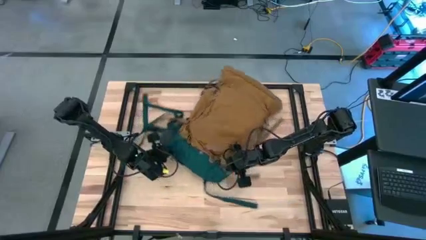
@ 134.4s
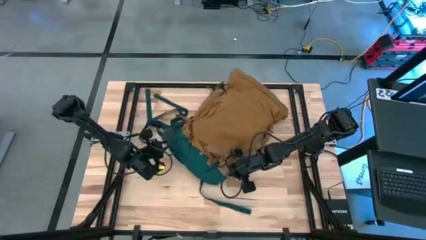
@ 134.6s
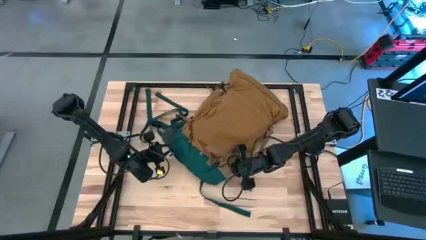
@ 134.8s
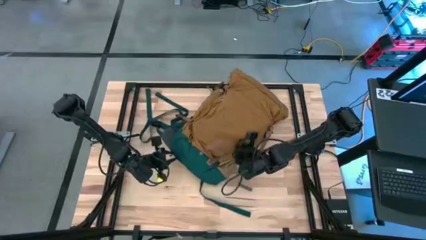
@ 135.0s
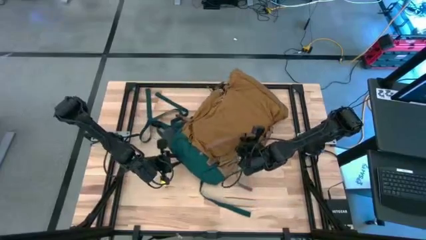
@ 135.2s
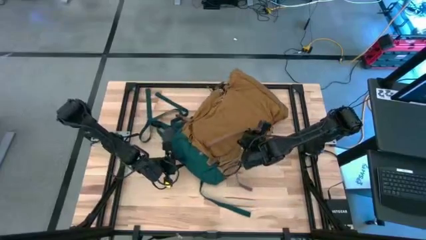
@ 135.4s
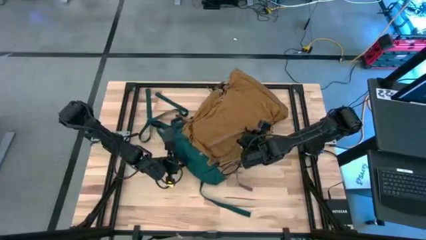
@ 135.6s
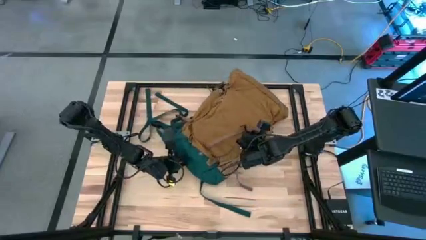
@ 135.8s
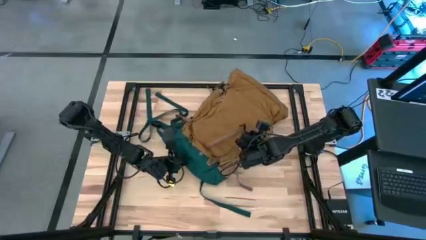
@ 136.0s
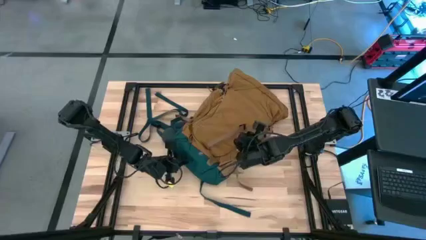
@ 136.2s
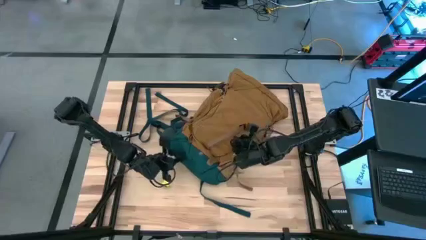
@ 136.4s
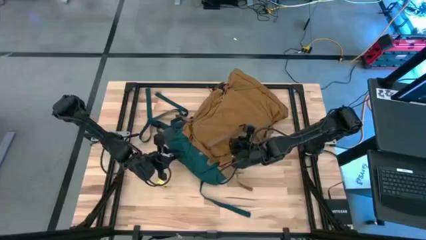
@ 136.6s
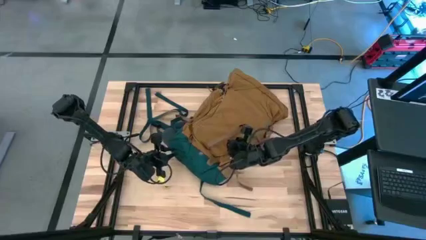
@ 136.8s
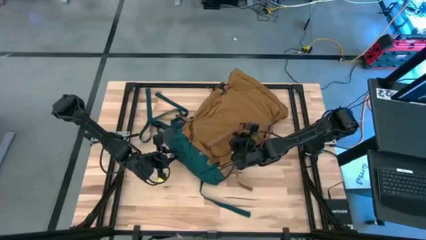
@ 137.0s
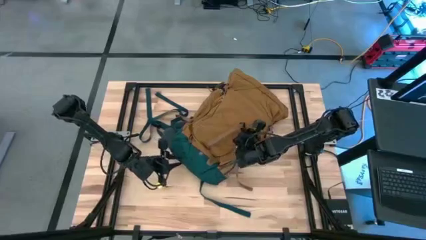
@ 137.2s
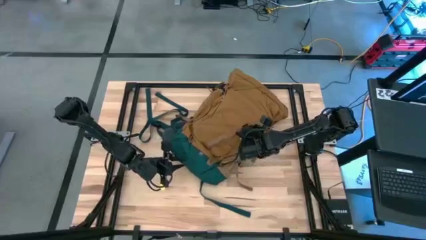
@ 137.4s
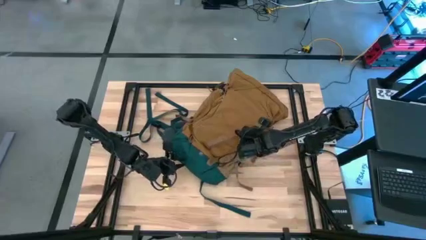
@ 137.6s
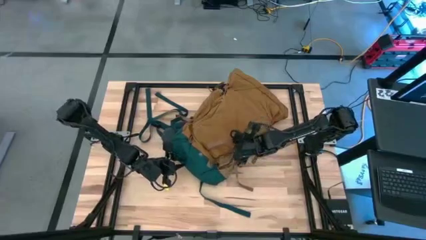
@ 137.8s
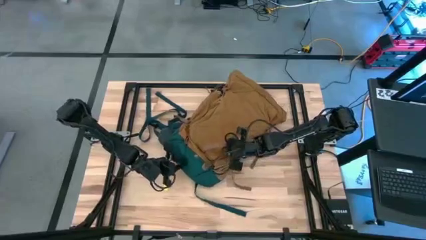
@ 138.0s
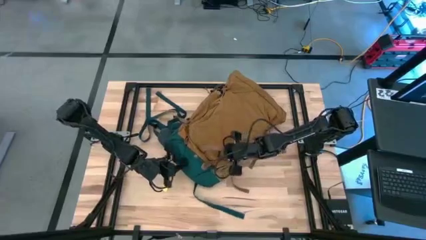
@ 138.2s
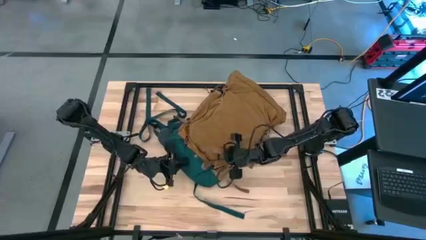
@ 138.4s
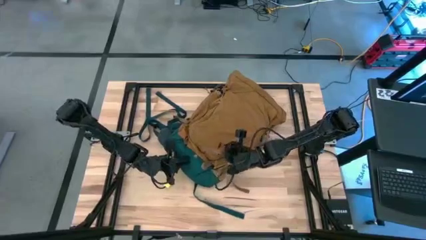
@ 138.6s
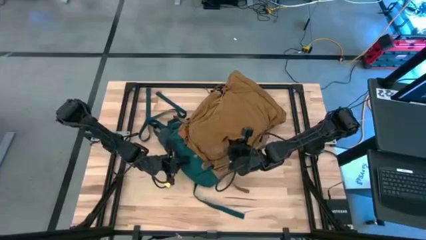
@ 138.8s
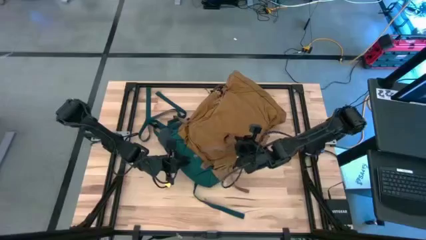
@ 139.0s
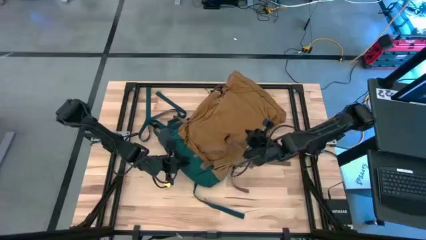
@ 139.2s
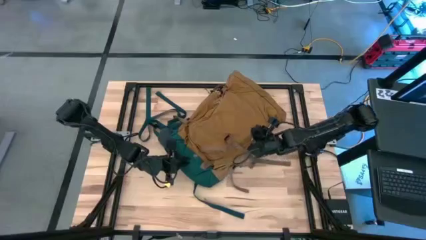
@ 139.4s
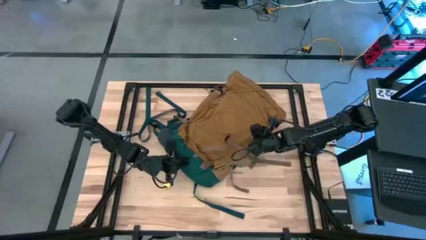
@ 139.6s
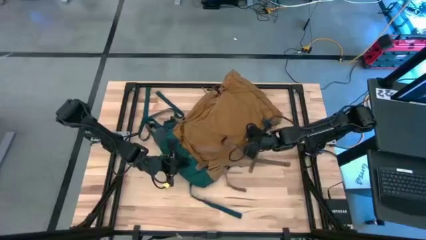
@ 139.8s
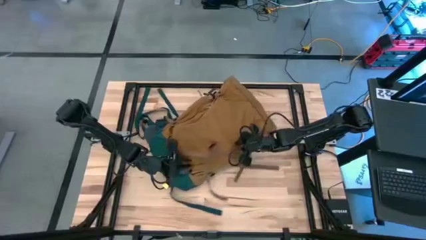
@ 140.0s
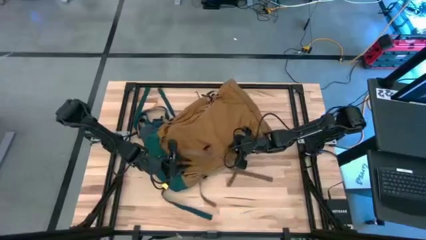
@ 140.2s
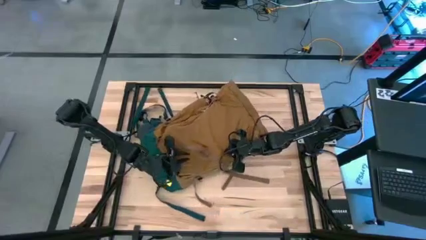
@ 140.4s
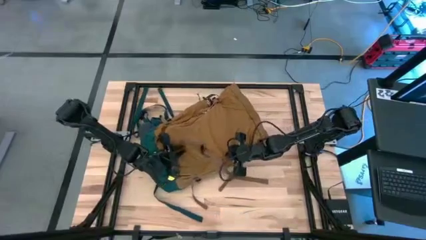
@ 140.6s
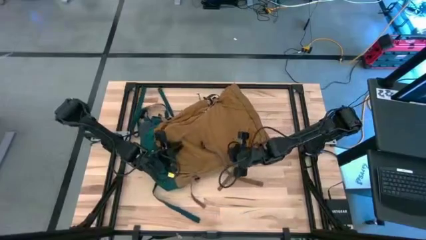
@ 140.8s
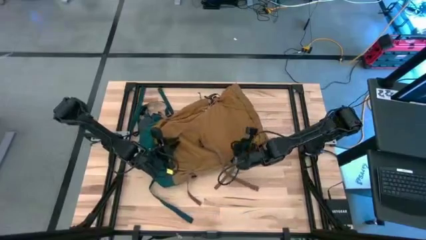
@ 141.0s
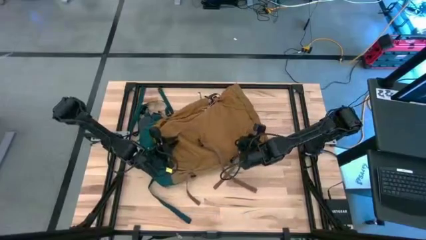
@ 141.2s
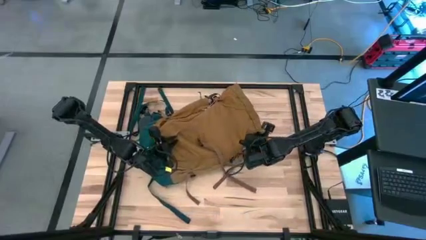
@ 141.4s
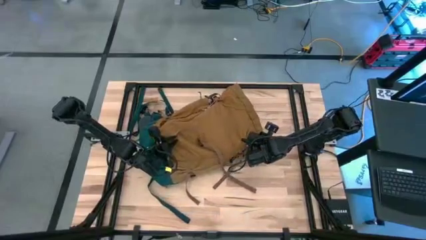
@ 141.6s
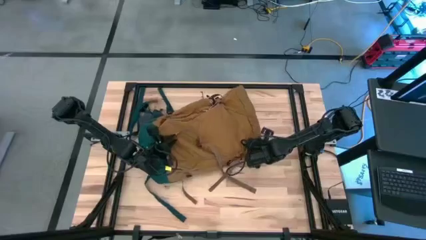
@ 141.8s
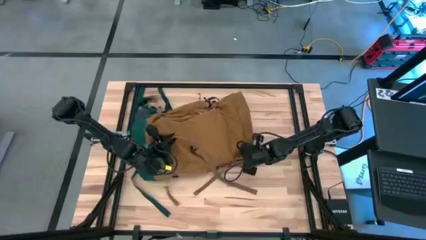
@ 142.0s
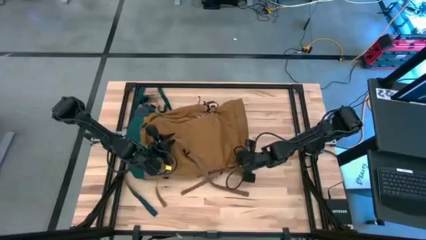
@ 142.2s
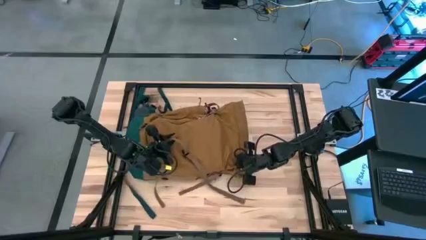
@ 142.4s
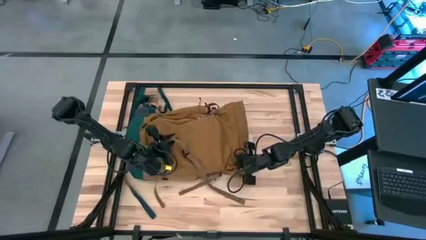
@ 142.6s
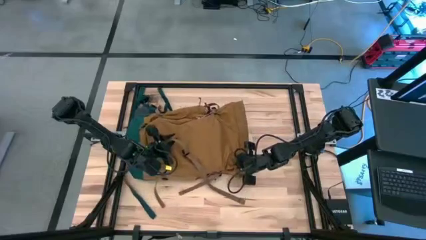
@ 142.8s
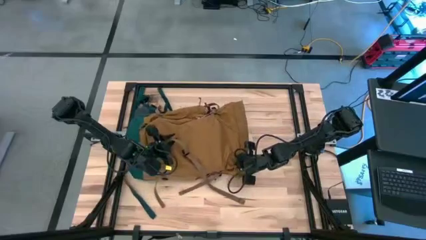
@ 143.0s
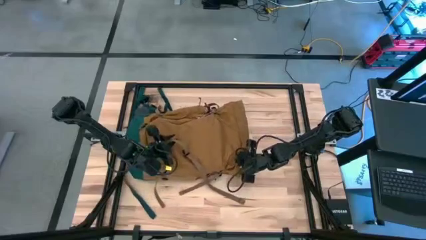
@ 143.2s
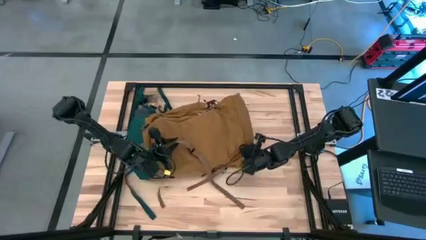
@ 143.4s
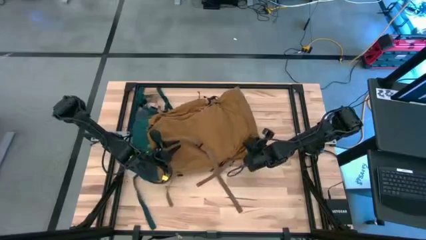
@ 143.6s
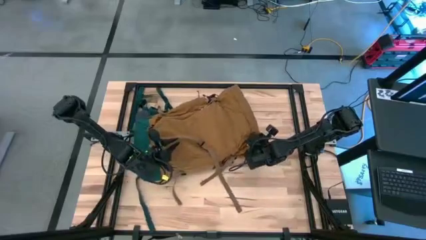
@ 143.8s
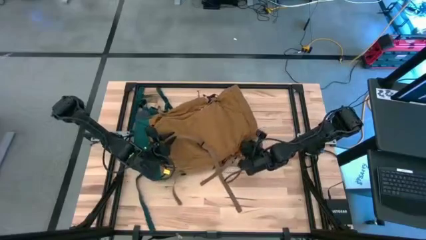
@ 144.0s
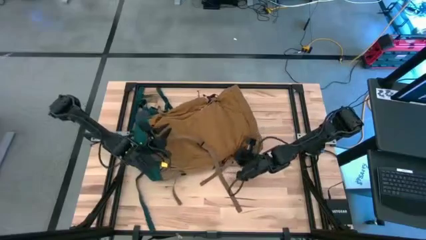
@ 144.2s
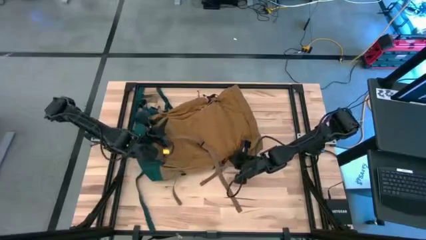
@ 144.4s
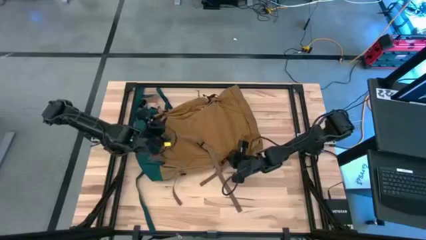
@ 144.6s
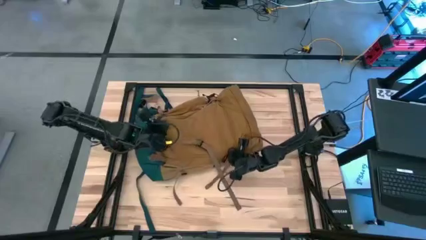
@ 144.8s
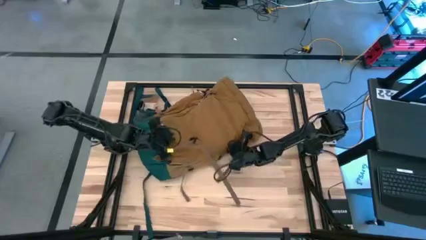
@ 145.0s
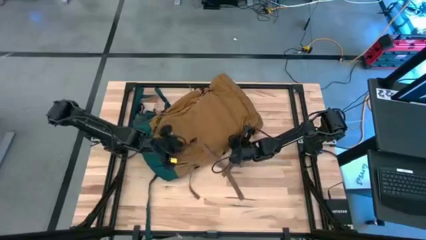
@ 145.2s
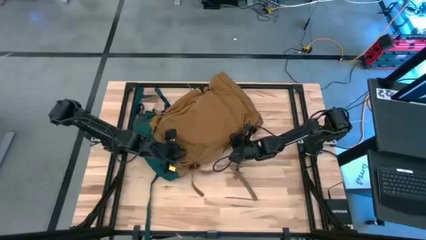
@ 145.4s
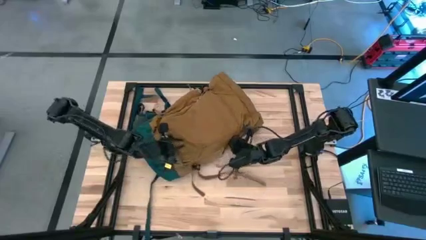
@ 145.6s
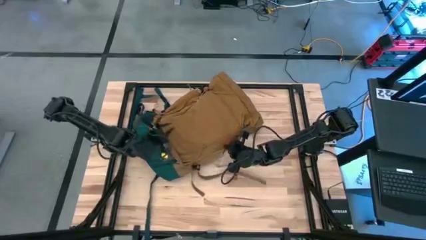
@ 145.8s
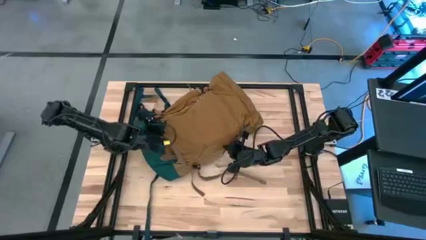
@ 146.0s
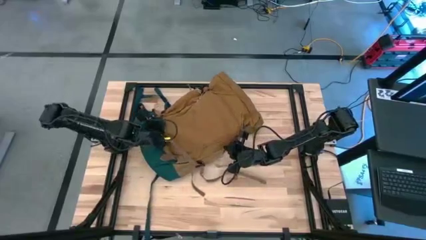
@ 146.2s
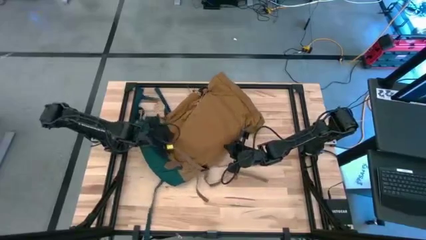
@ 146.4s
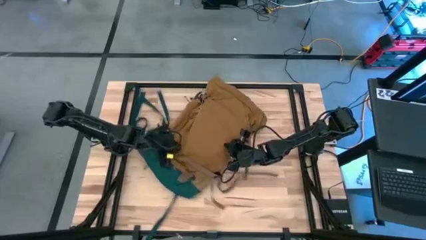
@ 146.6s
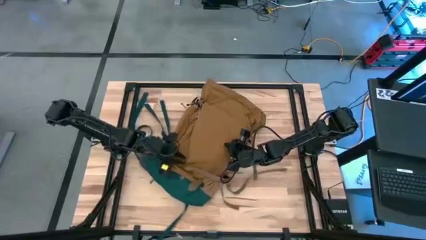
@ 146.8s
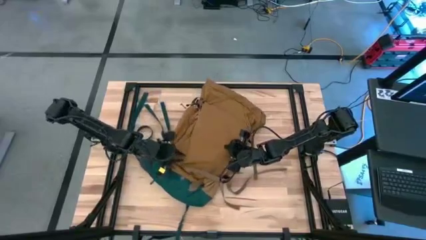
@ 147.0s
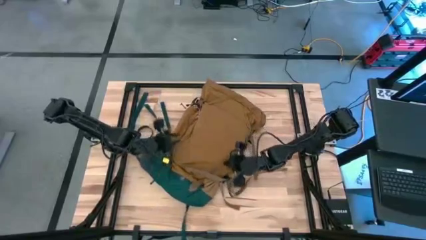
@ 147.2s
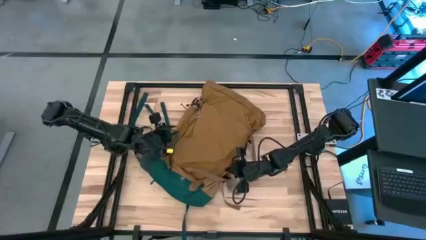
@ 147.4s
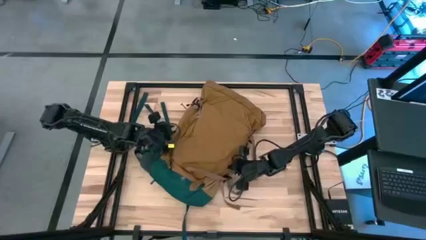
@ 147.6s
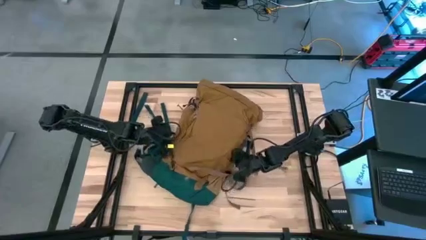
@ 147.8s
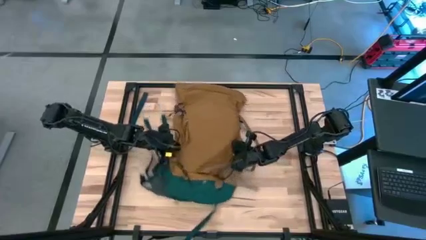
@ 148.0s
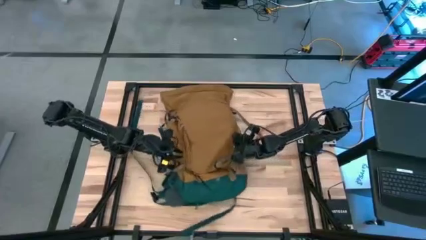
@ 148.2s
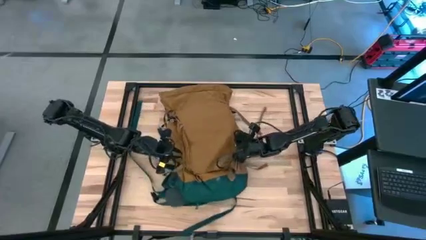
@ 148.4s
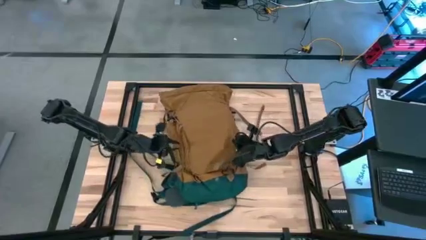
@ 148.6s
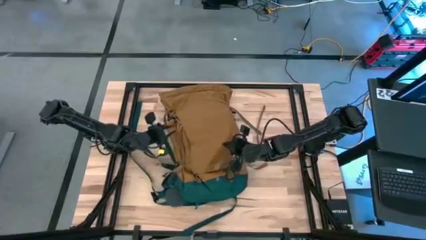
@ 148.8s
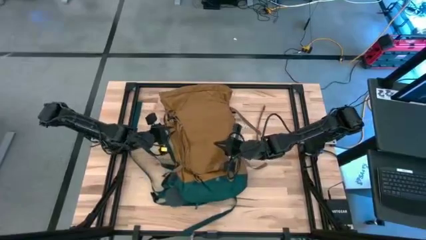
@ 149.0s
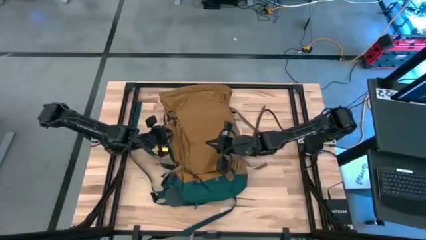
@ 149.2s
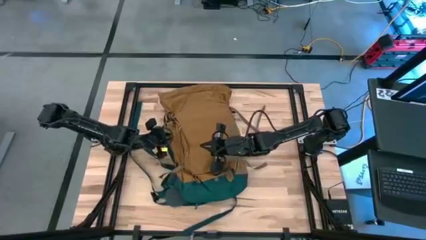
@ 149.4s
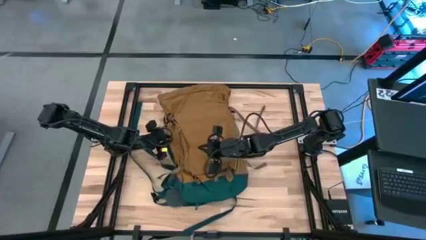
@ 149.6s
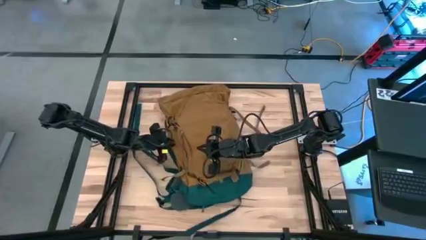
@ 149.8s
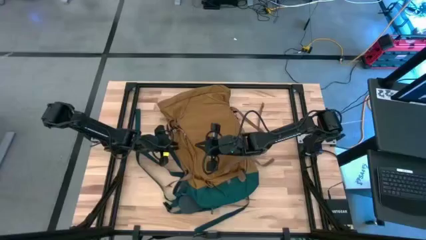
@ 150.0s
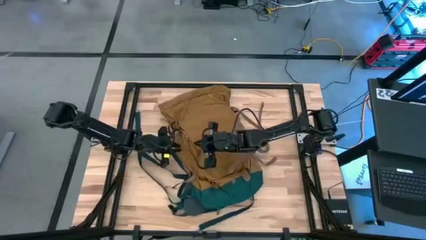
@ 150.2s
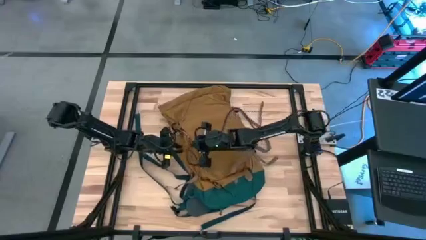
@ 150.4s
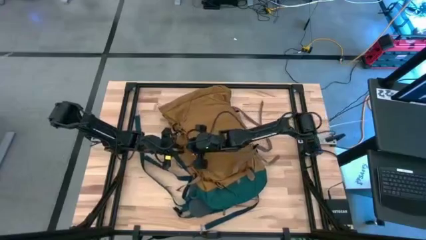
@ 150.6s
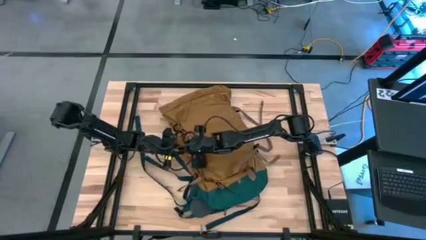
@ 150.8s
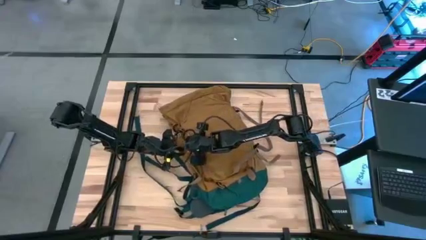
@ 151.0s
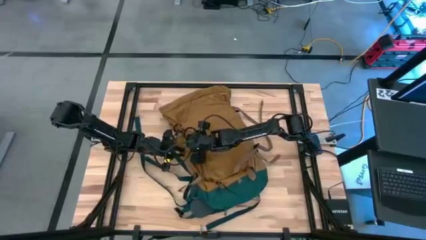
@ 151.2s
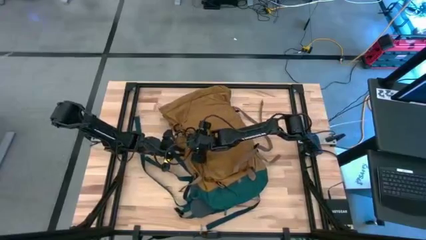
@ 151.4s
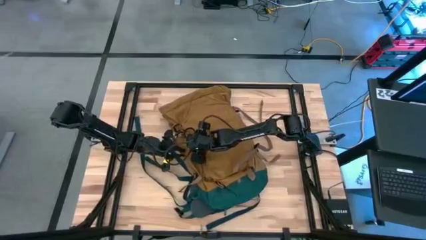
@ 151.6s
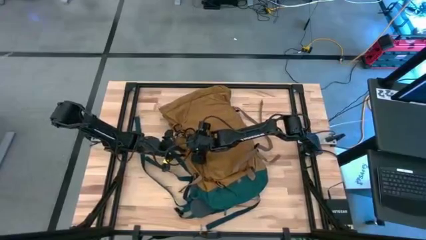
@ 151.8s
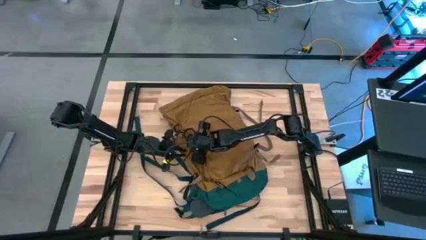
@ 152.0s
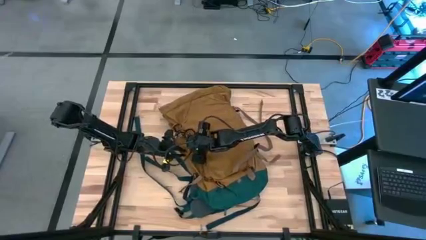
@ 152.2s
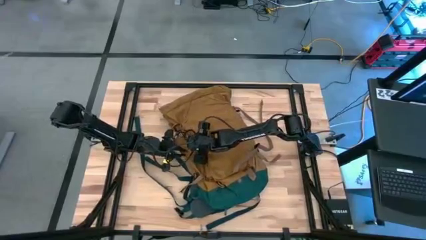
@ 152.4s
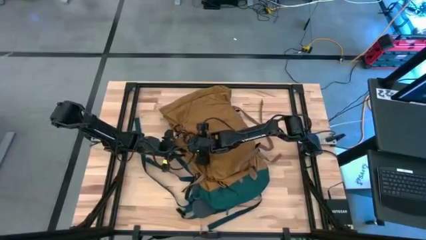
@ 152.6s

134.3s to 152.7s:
Task: Unpack backpack
Open the brown backpack
